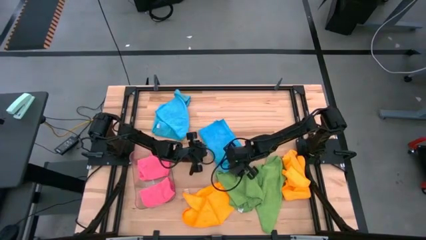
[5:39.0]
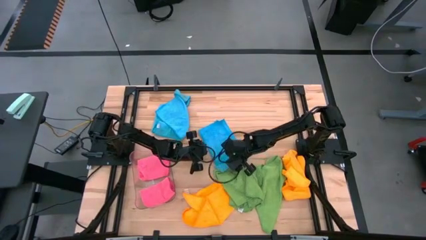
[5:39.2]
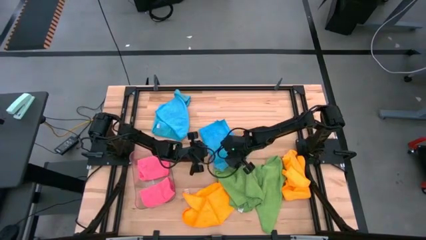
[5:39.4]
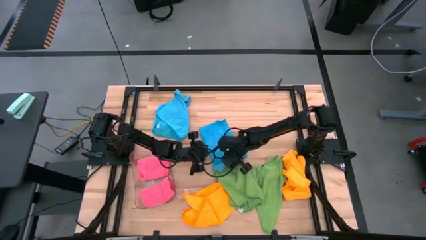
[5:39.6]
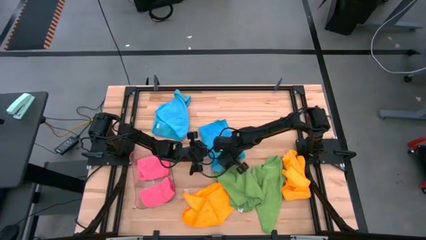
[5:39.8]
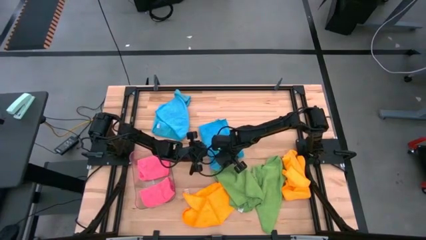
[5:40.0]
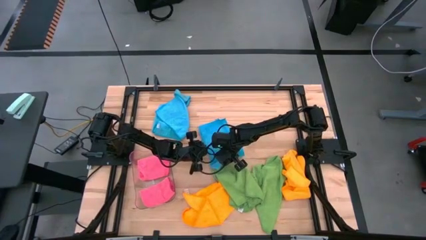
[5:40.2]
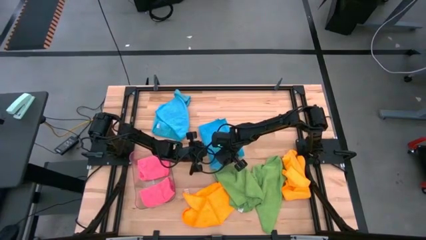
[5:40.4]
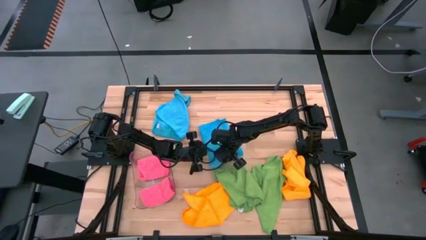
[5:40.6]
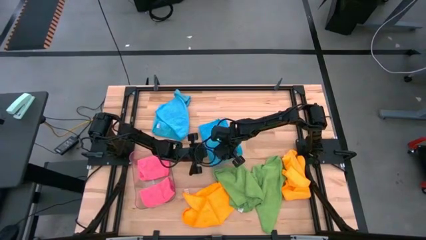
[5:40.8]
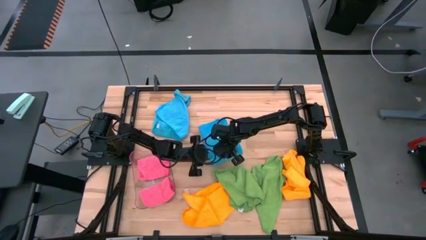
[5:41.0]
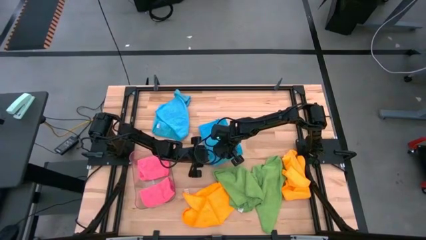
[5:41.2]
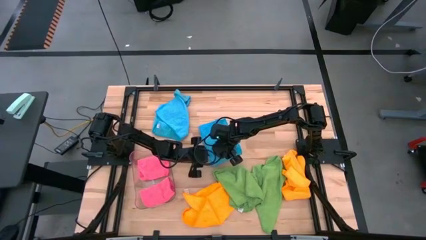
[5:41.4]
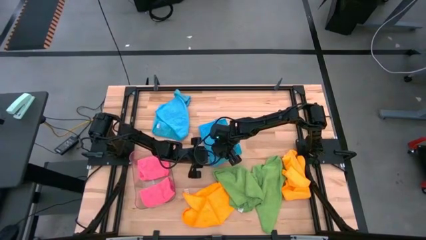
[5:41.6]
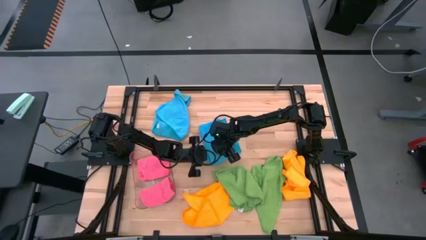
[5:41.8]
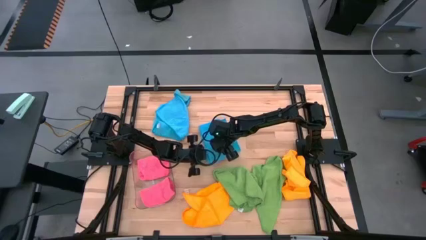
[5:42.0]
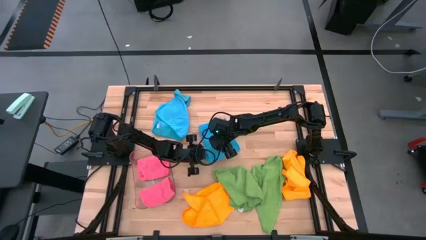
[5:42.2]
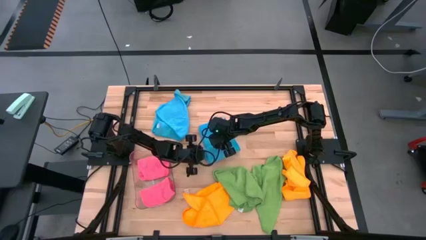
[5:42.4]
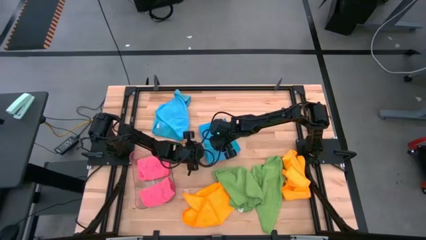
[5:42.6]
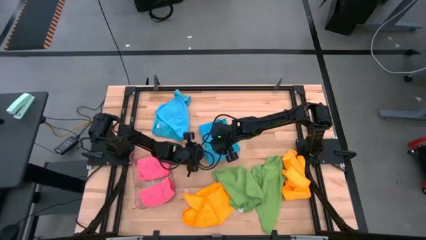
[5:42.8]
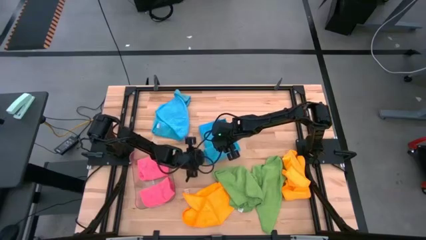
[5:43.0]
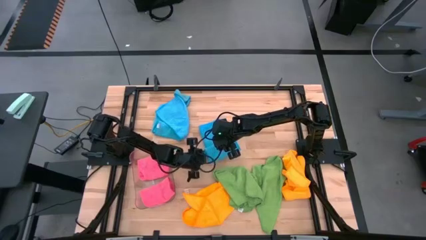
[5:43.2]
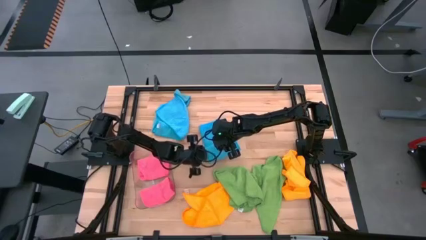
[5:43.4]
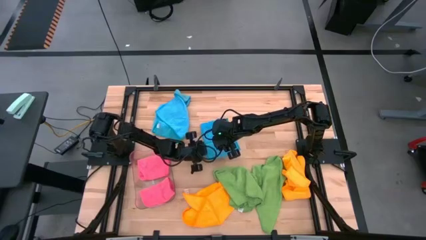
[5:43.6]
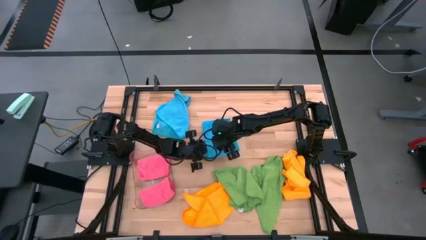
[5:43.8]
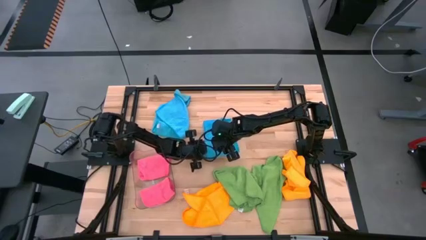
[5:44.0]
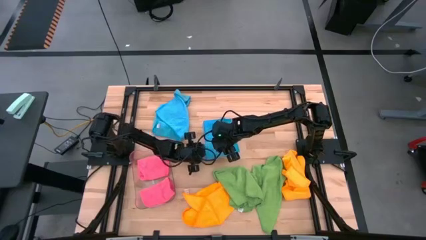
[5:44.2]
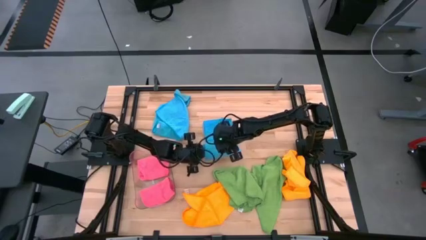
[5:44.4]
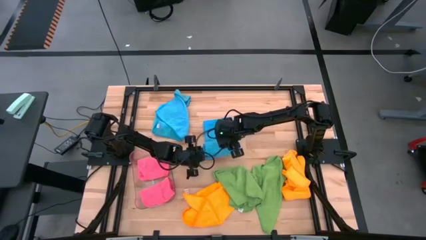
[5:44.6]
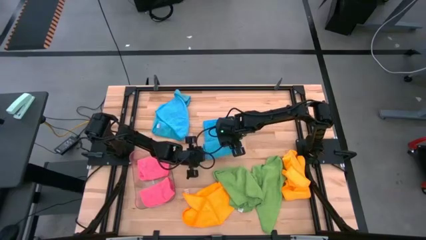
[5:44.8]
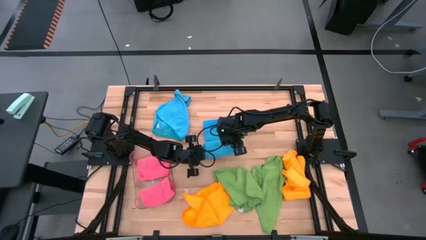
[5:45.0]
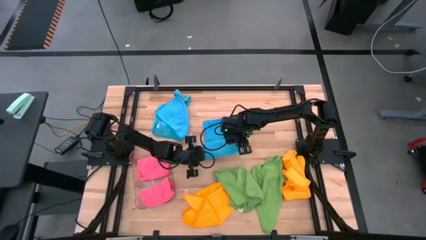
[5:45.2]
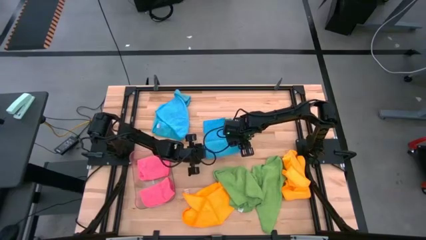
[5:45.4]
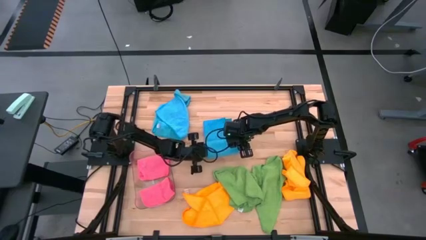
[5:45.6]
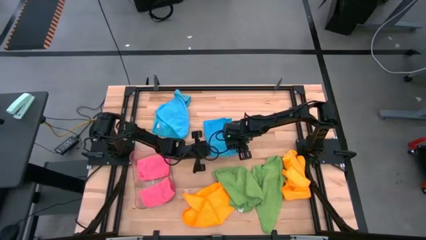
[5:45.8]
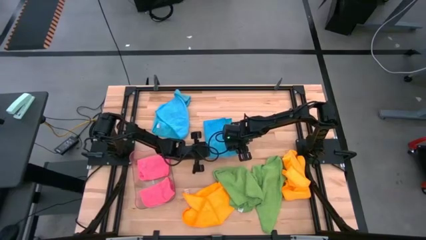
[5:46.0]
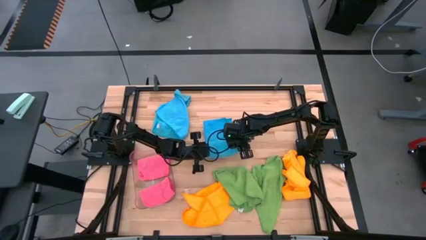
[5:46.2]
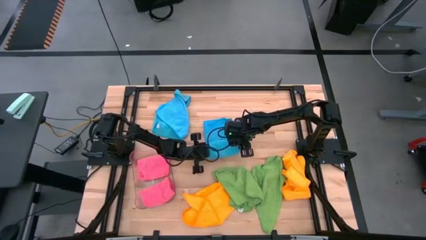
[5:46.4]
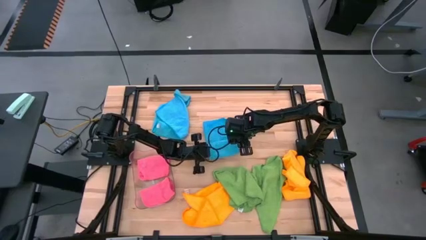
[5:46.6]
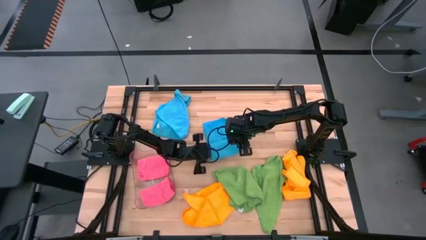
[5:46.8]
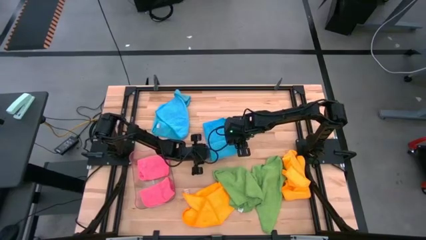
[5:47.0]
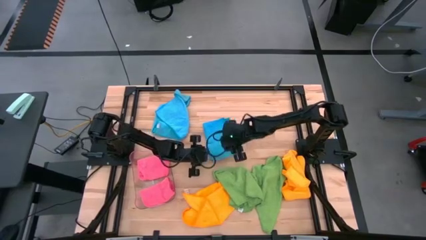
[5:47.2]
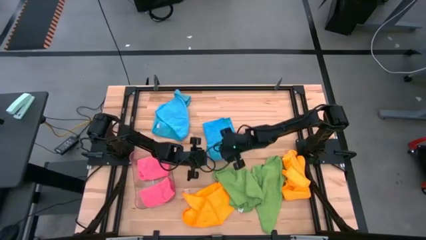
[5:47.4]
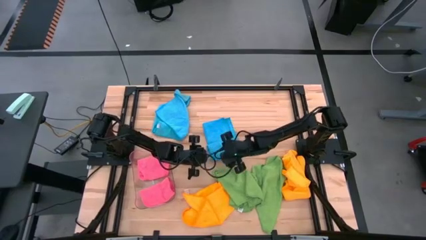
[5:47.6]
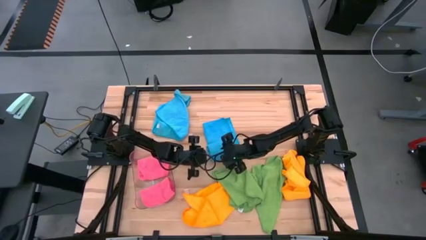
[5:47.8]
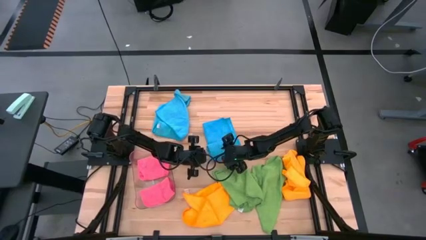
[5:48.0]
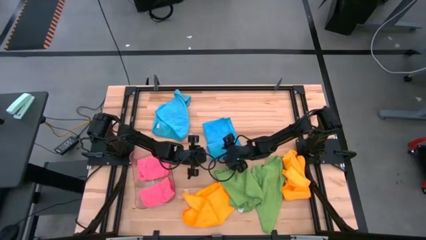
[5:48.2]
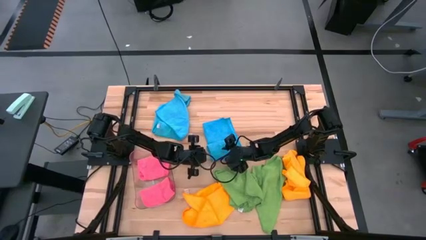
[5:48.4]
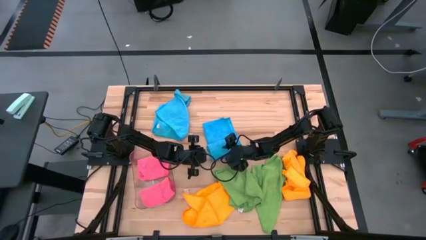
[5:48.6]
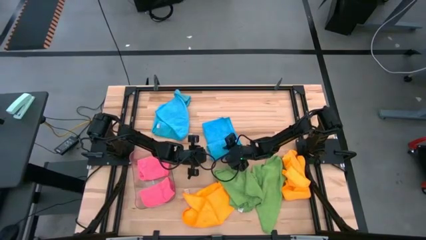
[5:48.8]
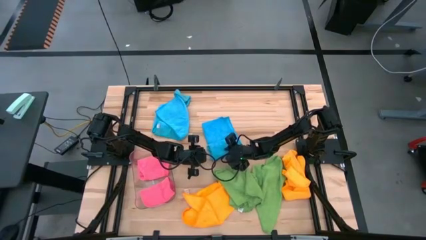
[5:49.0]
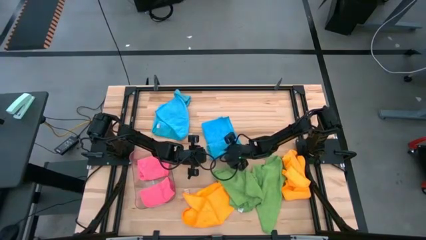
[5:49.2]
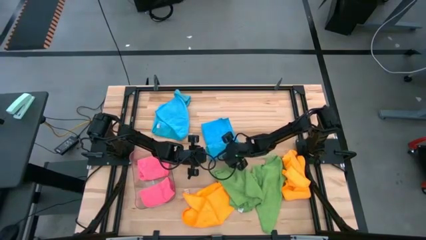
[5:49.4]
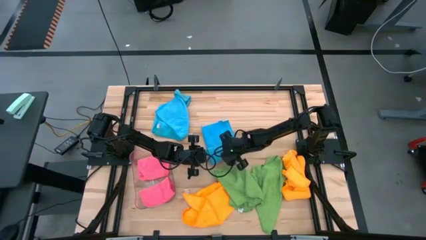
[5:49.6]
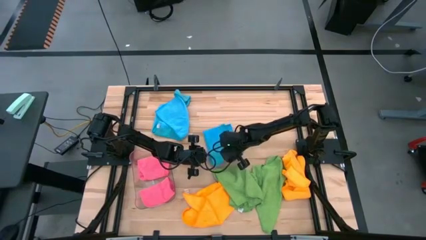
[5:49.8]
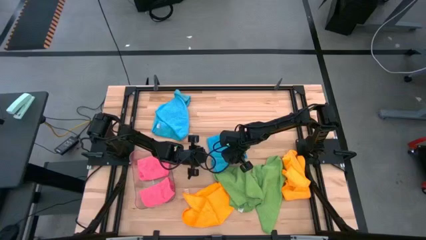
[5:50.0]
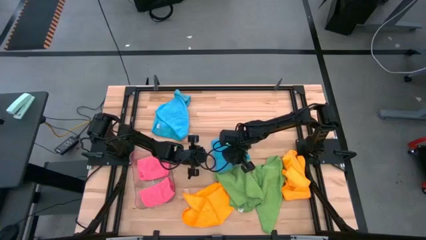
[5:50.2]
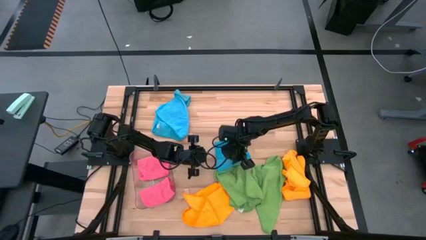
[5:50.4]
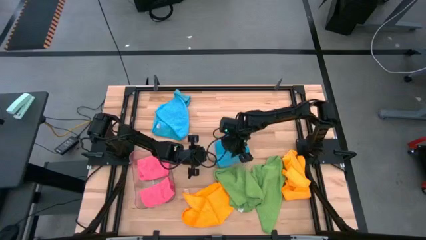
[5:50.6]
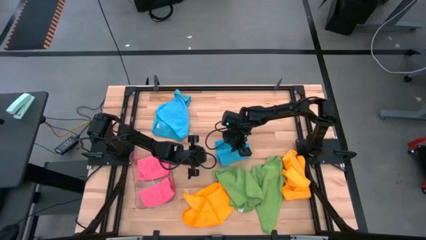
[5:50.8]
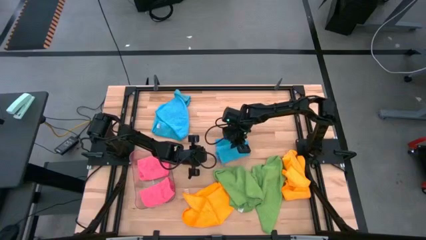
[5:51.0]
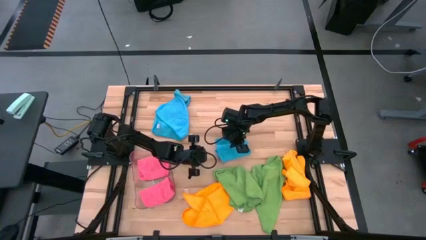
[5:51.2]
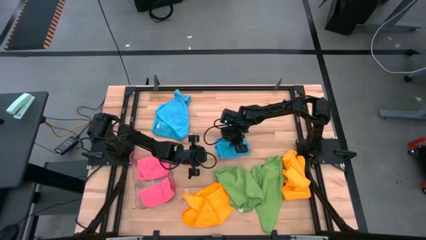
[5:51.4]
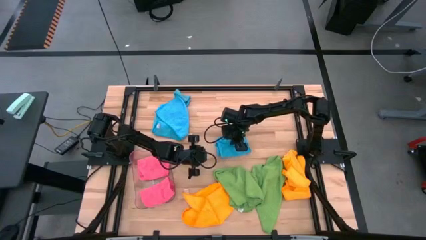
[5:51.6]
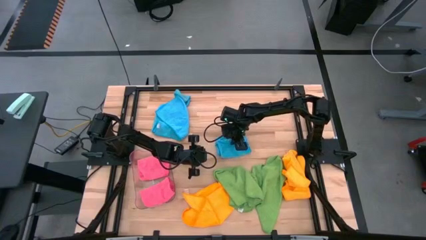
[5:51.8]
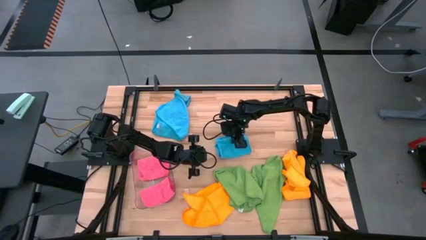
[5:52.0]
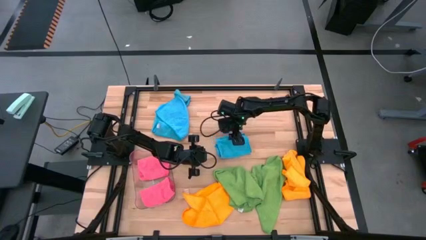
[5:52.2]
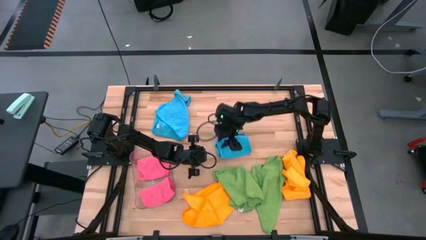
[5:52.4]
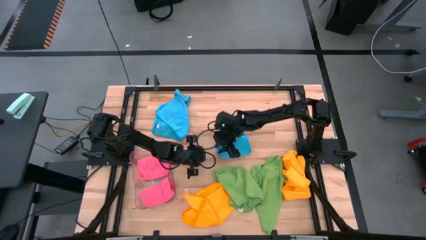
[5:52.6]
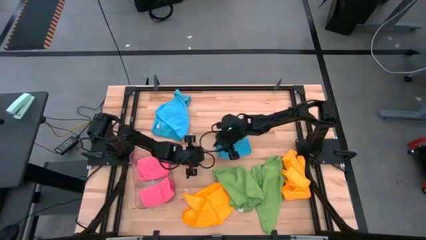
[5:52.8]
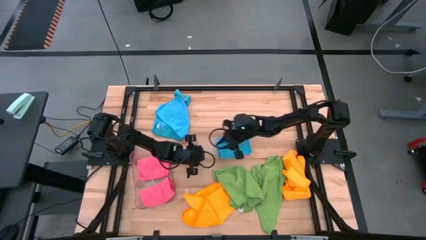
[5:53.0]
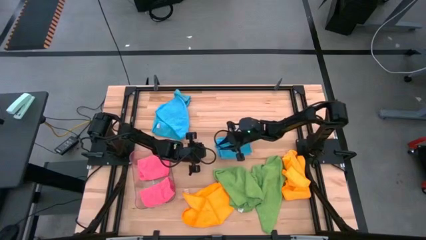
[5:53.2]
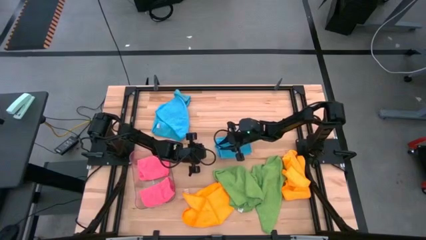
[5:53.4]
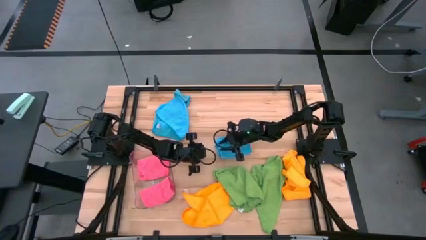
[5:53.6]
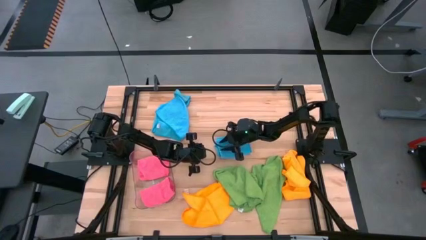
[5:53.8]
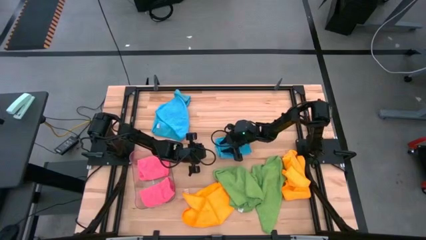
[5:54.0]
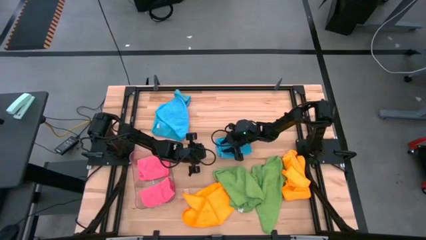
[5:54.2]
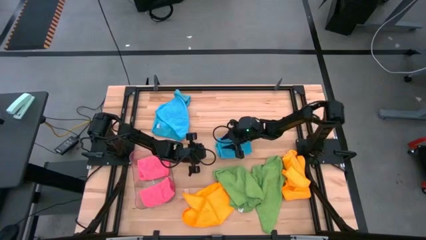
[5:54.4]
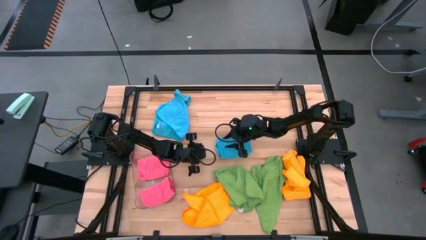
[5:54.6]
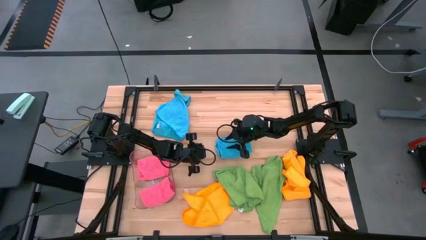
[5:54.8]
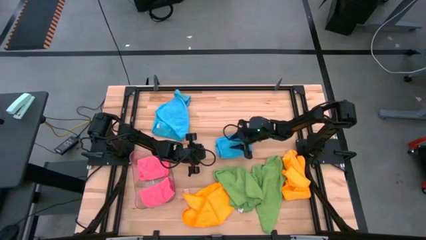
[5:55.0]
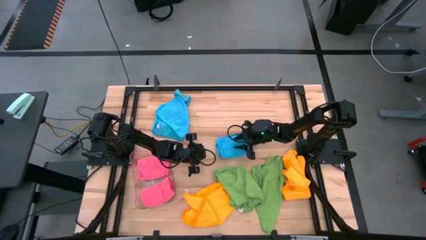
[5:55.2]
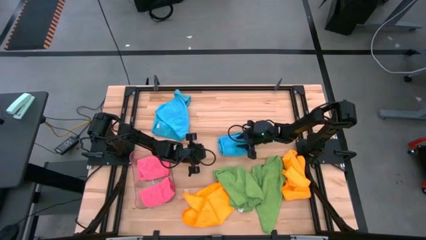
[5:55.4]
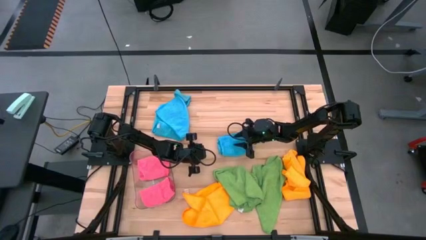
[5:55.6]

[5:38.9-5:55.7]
Task: Fold microfiber towels
Fold the bottom blue microfiber cloth
